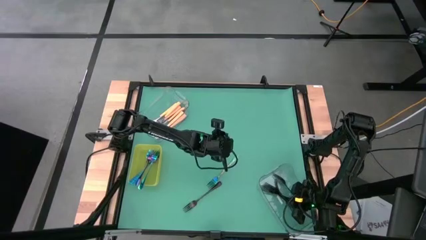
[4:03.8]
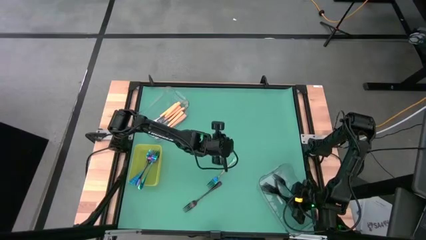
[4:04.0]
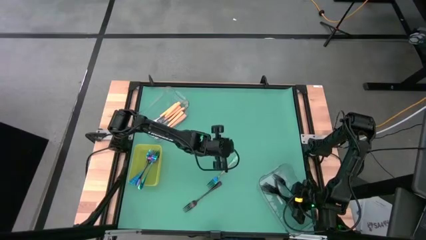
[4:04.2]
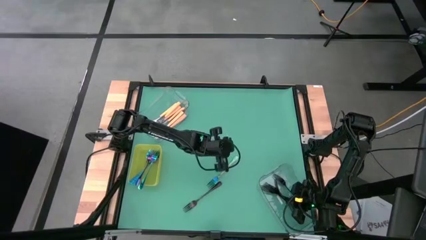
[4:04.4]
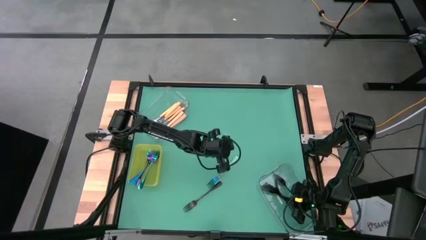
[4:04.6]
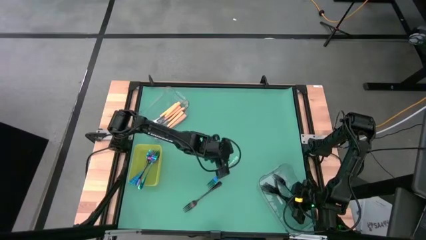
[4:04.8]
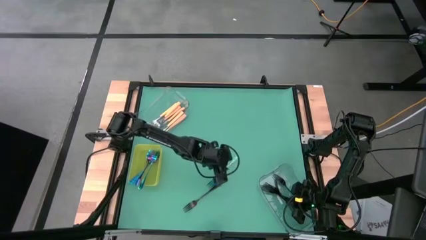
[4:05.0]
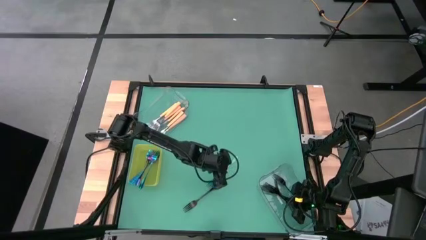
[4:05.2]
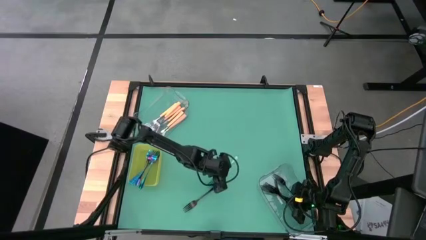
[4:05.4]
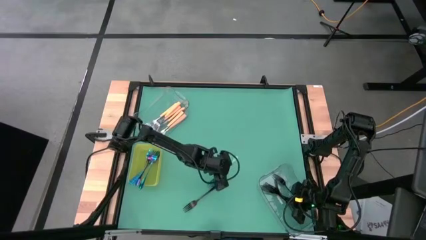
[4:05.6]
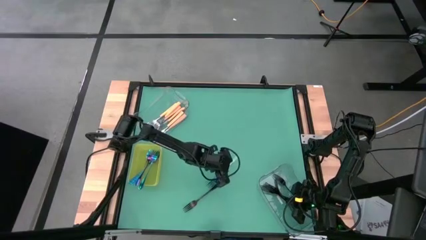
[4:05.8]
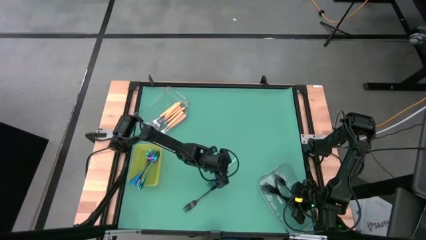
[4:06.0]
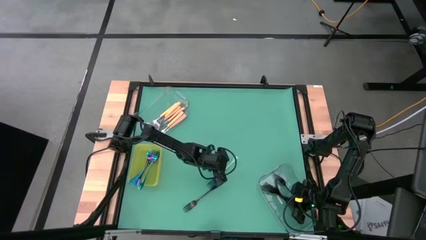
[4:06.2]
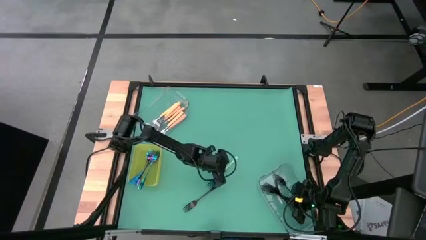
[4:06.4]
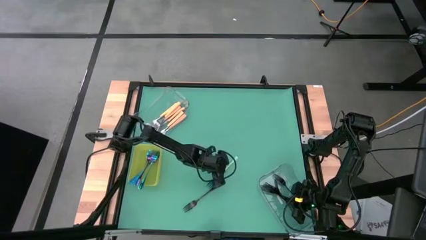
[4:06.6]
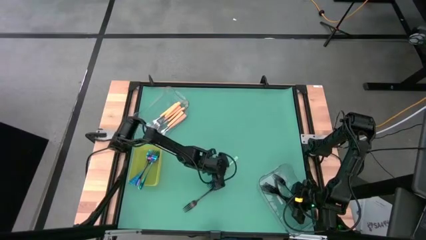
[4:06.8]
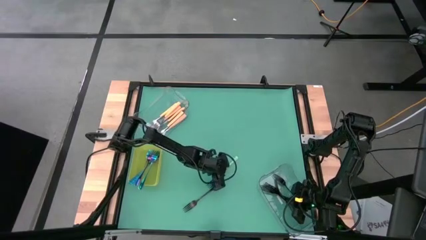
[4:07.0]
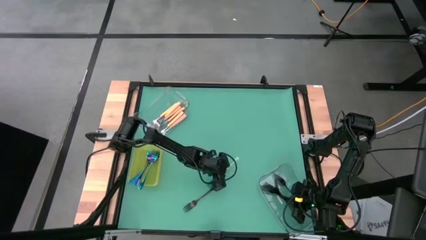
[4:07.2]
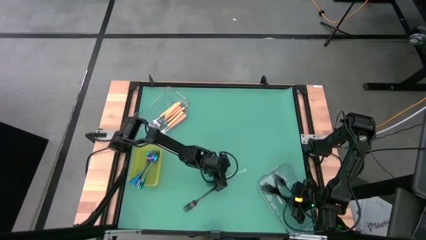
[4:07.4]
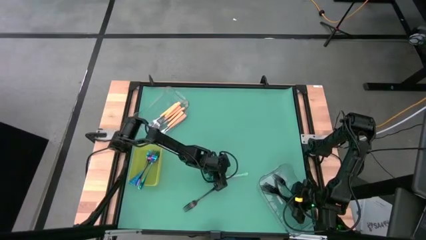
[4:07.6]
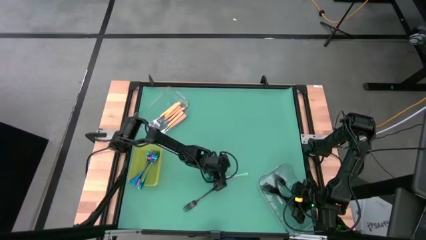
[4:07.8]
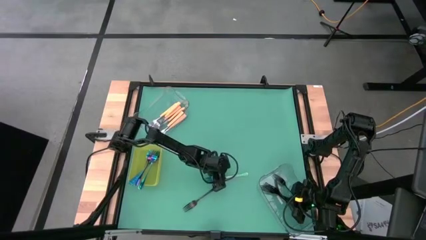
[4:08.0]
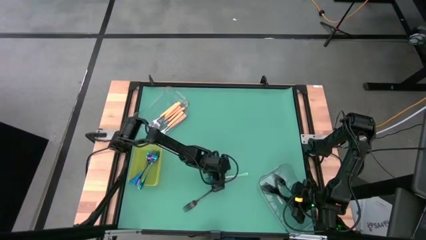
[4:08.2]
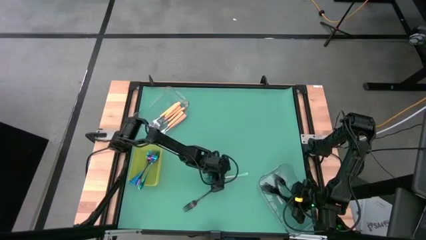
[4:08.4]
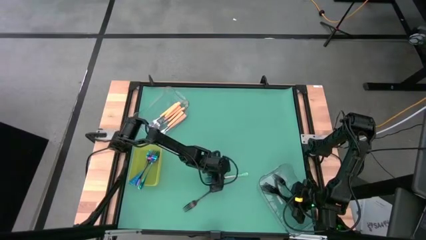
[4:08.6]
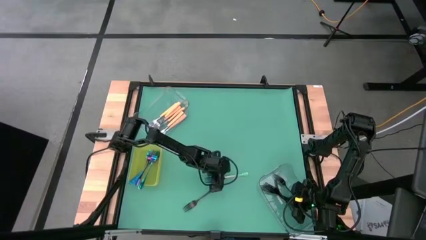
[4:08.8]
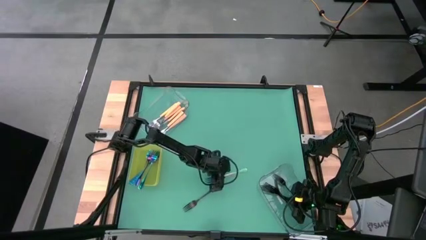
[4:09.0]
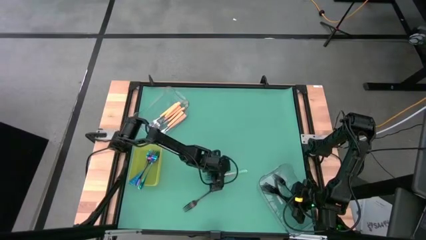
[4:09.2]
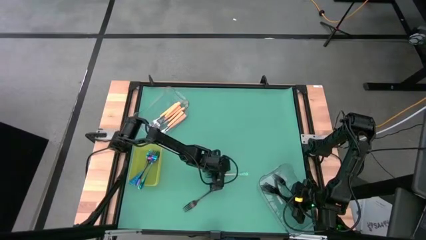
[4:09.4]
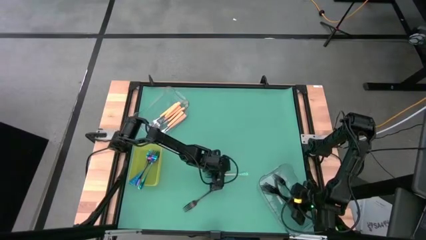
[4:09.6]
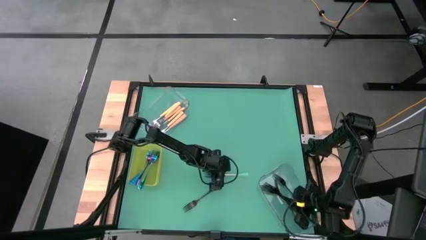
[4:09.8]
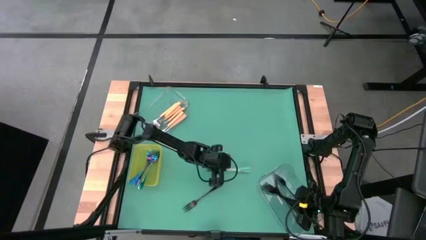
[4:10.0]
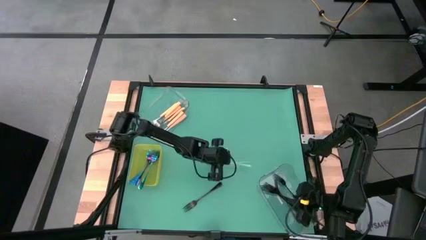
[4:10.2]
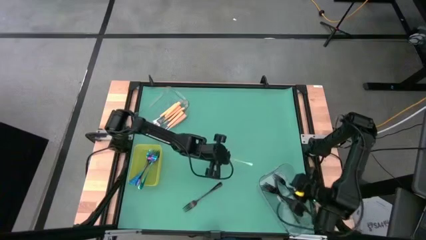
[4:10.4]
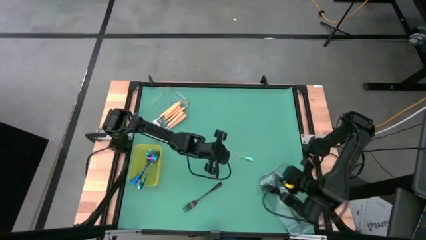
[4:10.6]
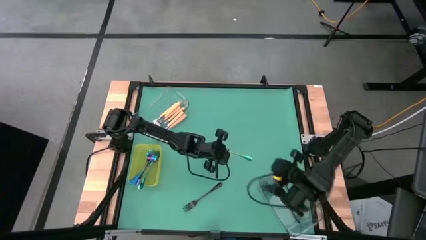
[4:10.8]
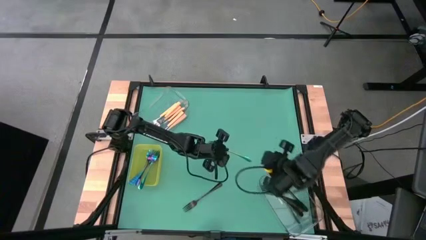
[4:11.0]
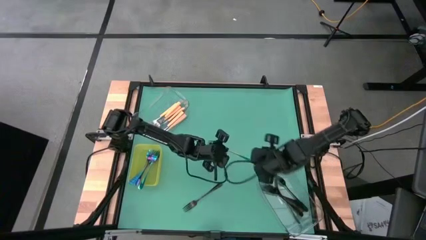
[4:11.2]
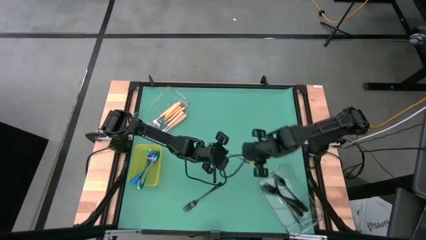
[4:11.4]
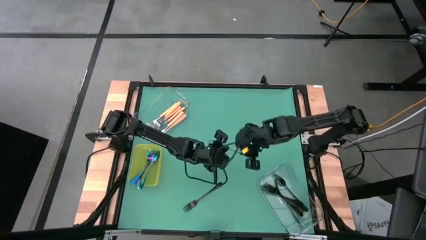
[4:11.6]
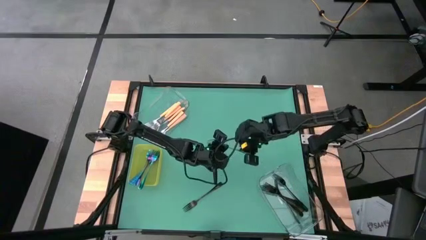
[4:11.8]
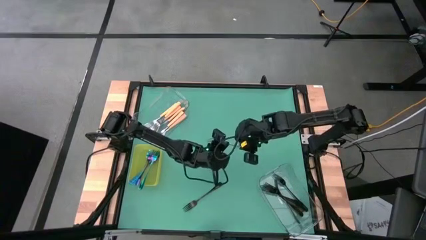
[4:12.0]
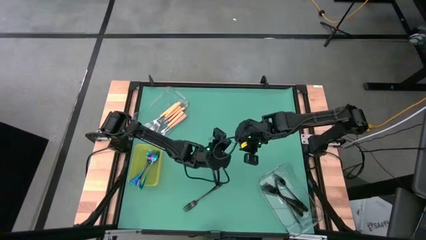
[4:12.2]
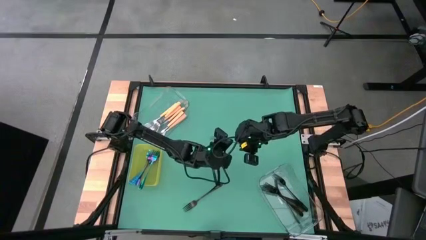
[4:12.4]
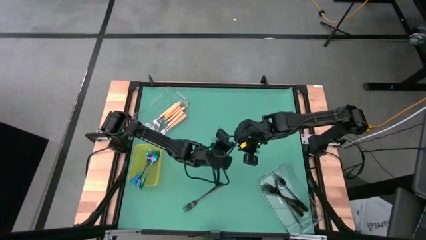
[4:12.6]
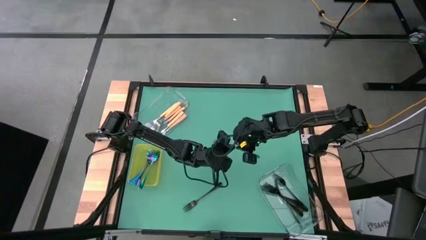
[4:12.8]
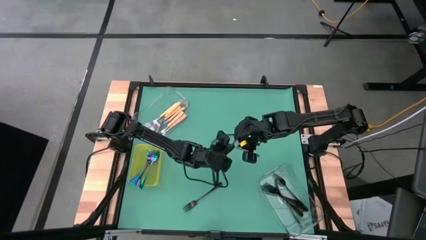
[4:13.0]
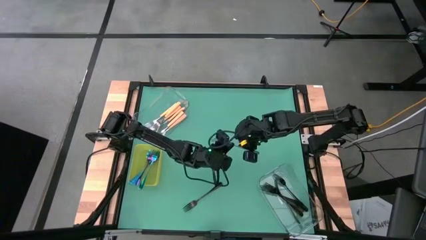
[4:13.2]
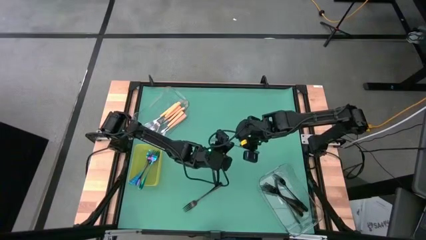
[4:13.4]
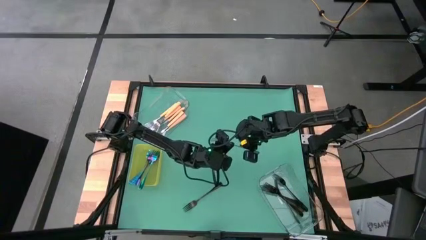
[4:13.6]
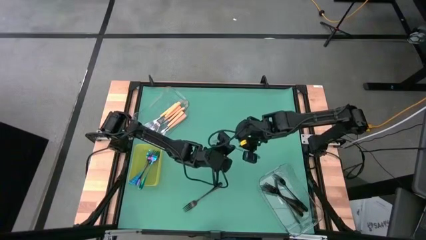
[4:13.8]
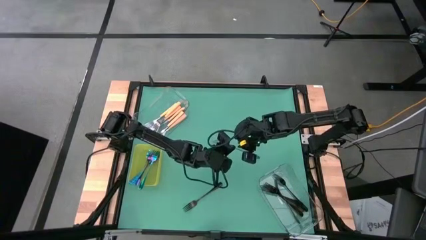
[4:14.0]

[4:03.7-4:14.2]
Task: Sort silverware by color (type)
Put the blue fork in the yellow bin

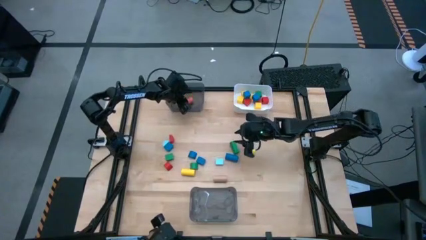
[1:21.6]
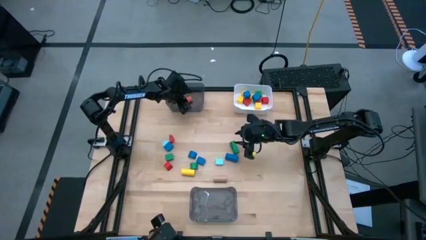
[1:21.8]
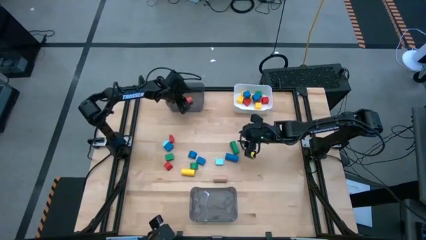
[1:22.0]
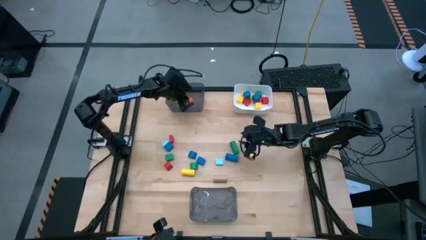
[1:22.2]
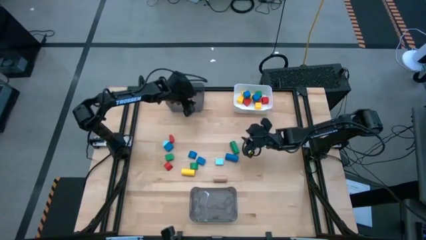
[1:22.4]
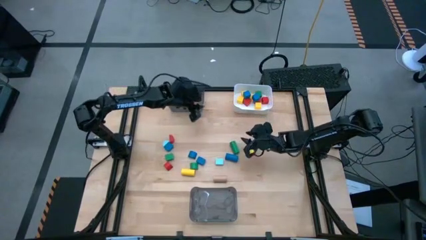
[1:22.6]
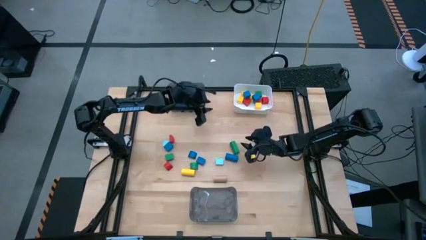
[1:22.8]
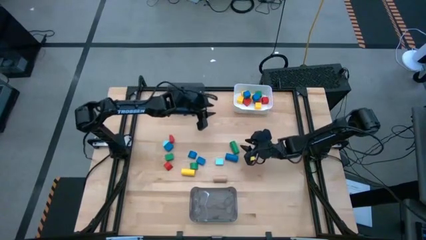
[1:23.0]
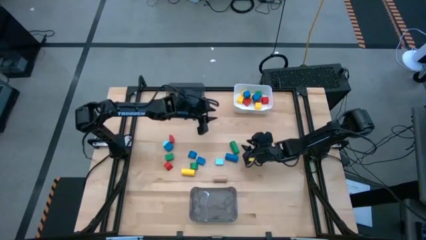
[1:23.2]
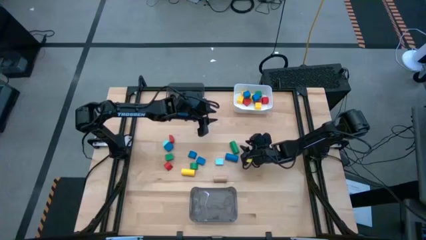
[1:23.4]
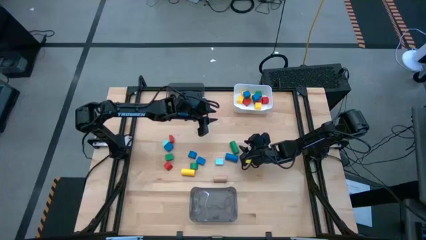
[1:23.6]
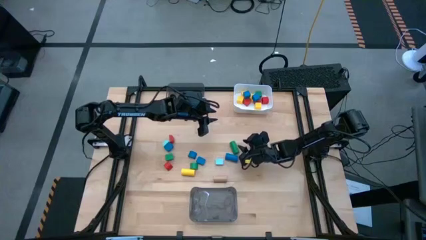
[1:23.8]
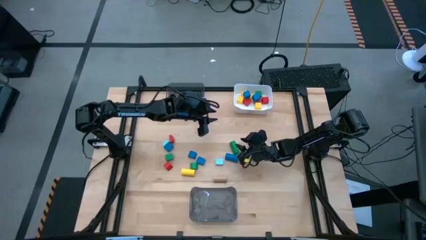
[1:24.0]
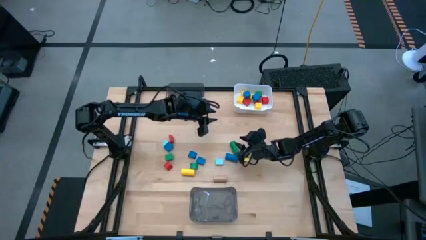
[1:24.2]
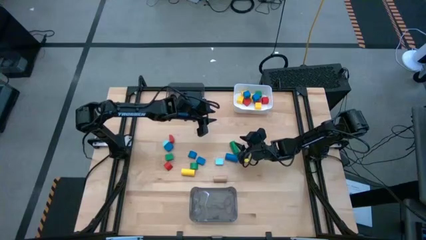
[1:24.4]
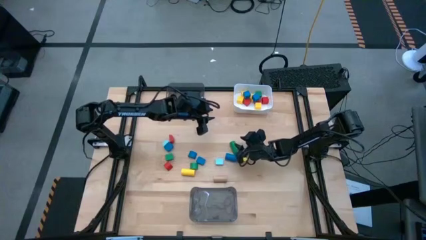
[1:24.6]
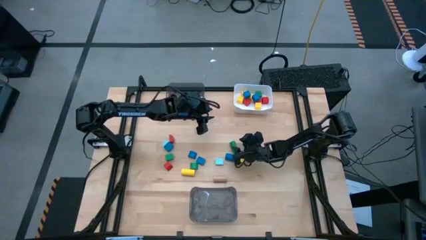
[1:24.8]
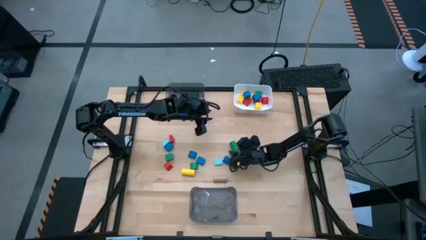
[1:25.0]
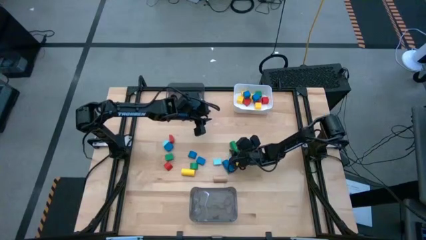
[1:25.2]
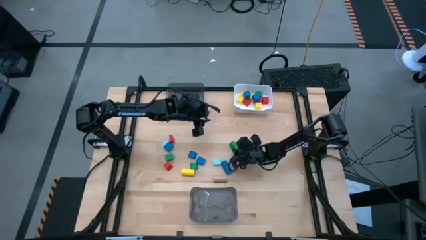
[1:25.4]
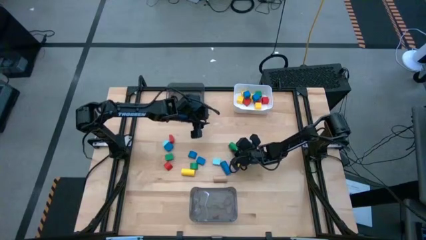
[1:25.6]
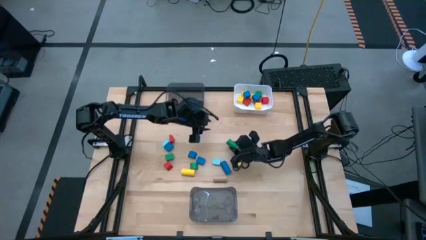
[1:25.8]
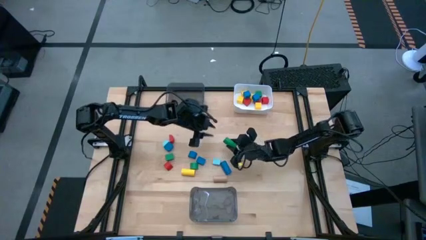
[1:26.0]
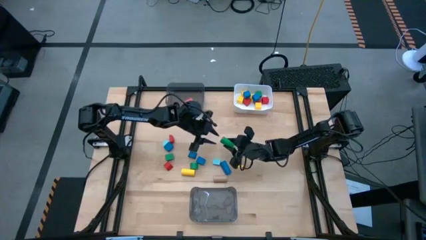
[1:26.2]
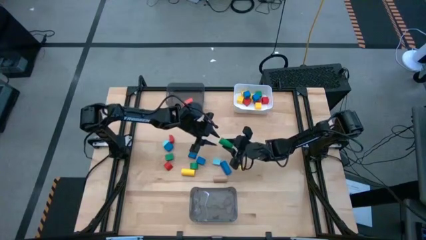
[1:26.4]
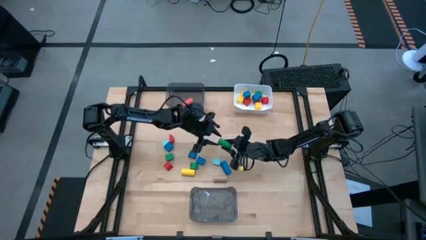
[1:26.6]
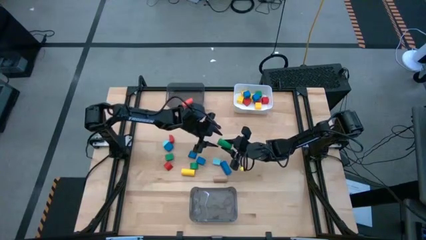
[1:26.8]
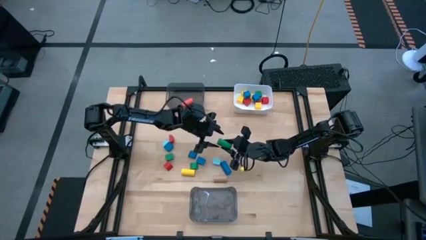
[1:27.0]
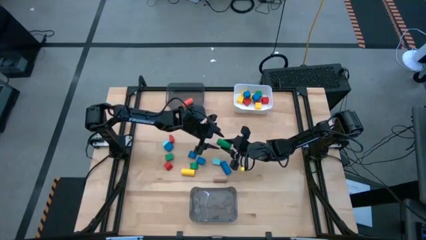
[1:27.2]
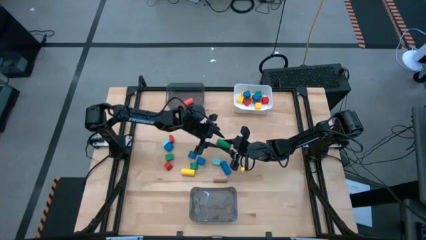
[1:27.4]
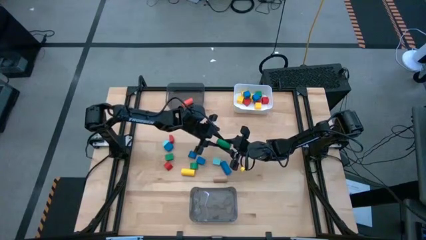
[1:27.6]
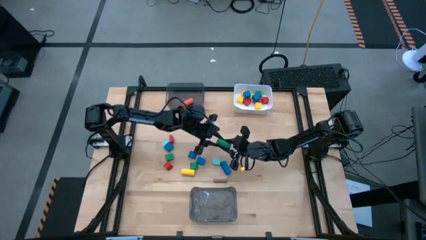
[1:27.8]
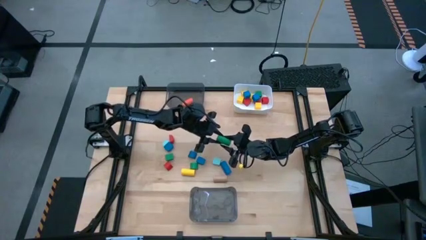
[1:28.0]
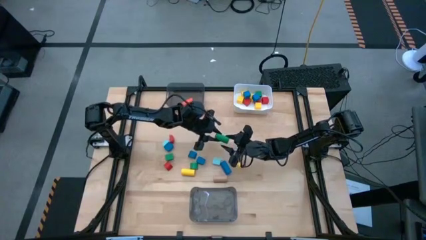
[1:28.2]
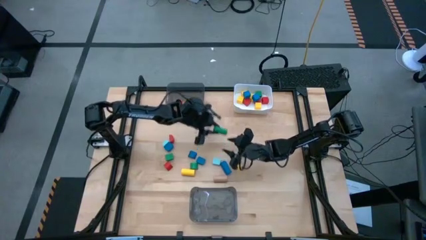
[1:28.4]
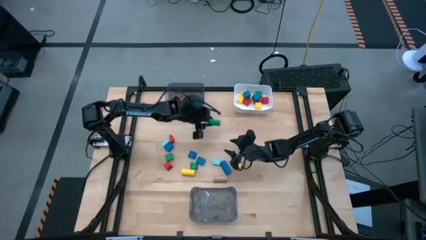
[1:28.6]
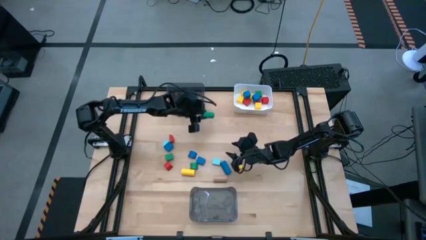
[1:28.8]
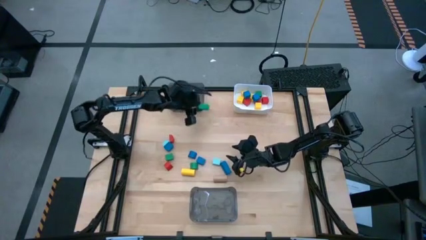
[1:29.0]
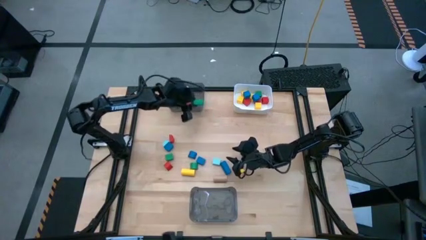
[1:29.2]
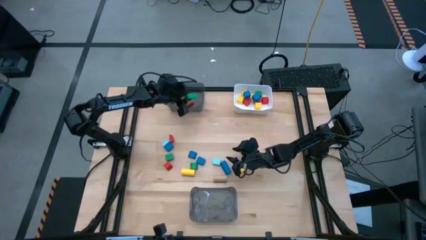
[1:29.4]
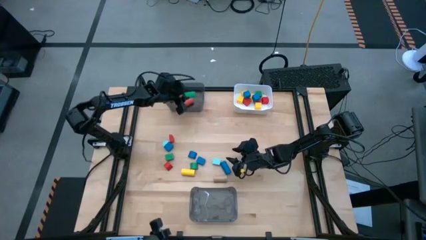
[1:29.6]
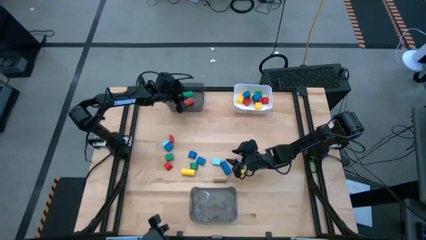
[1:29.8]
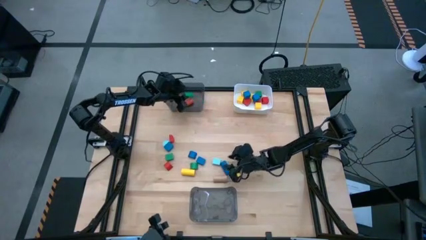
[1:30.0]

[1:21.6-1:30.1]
Task: Sort blocks by size
Put the green cylinder block into the top black bin
